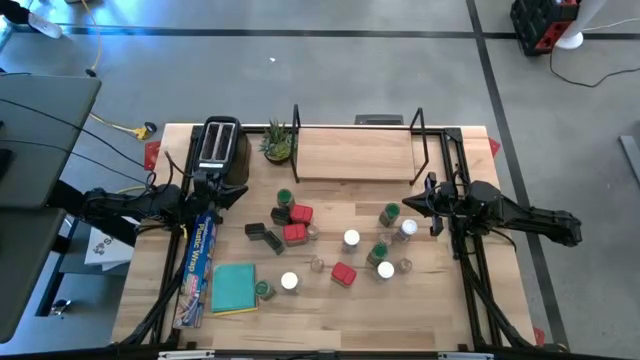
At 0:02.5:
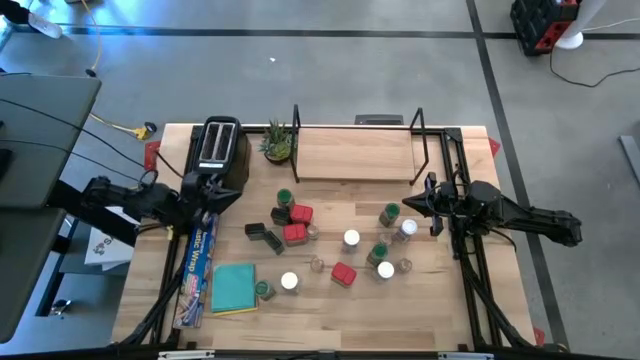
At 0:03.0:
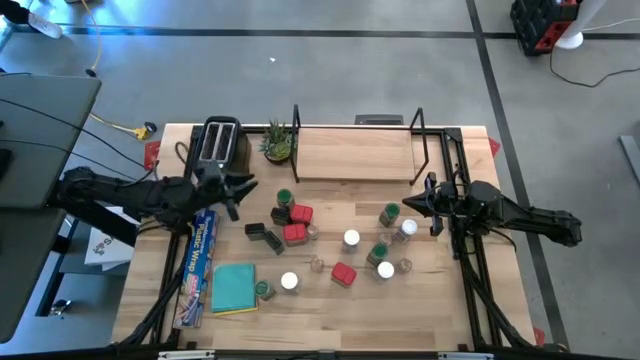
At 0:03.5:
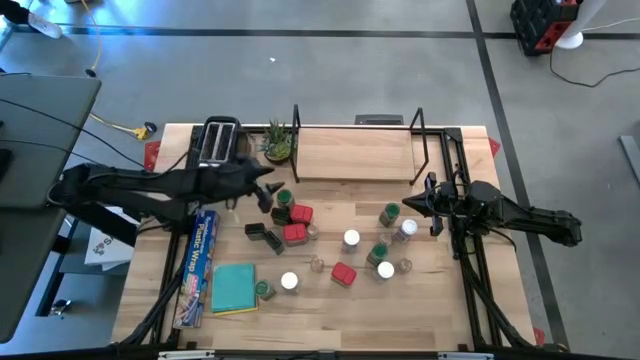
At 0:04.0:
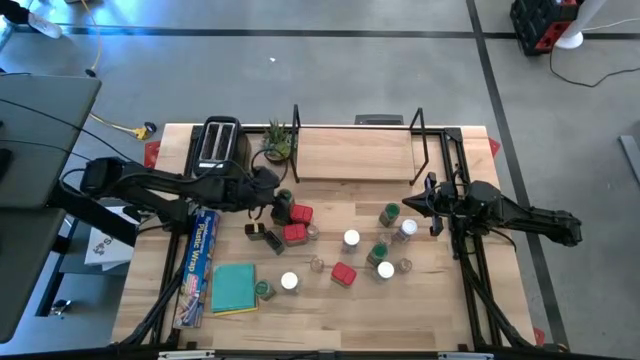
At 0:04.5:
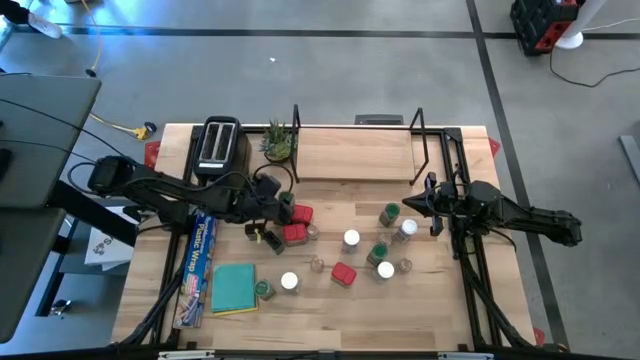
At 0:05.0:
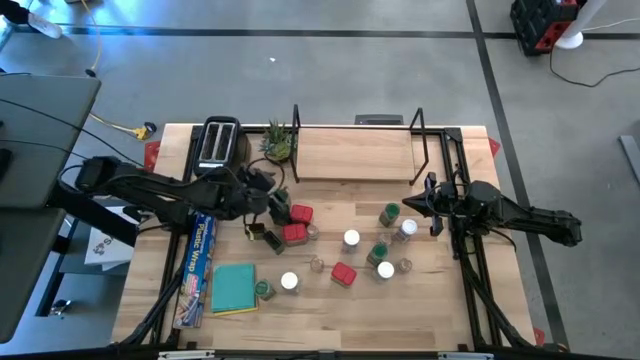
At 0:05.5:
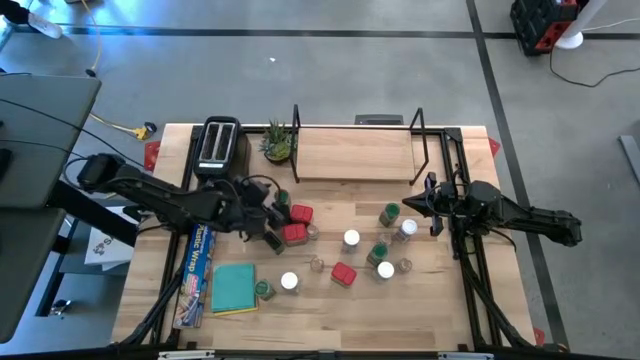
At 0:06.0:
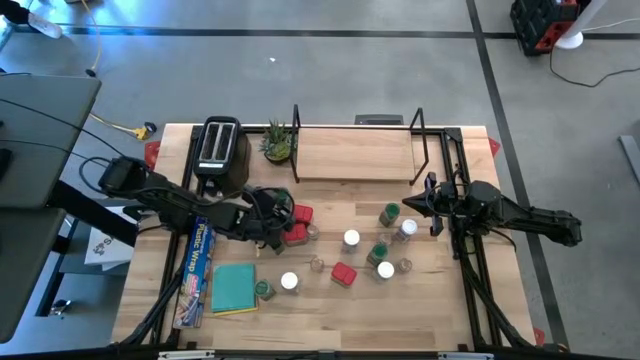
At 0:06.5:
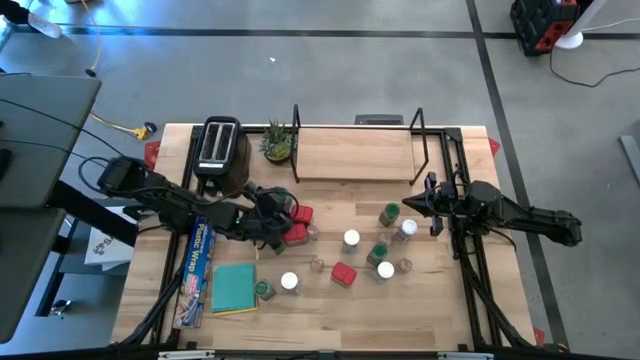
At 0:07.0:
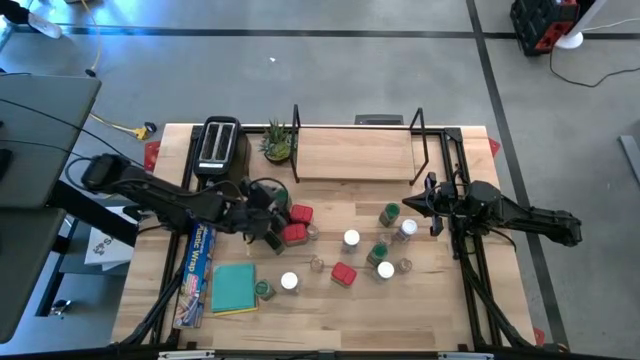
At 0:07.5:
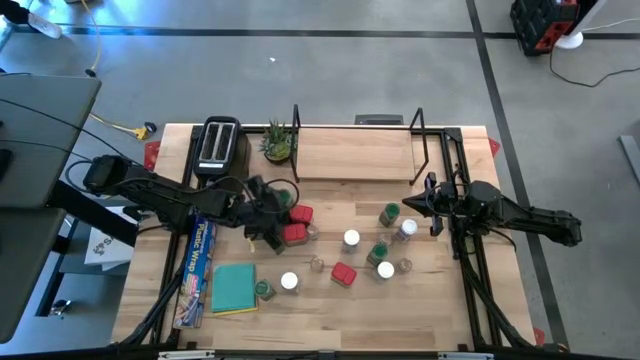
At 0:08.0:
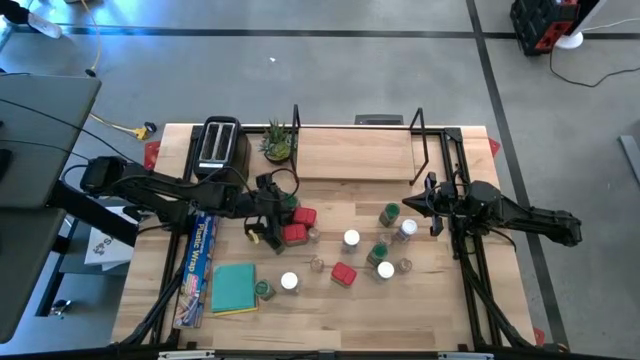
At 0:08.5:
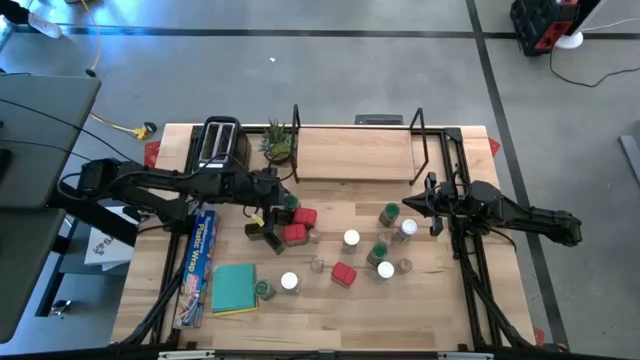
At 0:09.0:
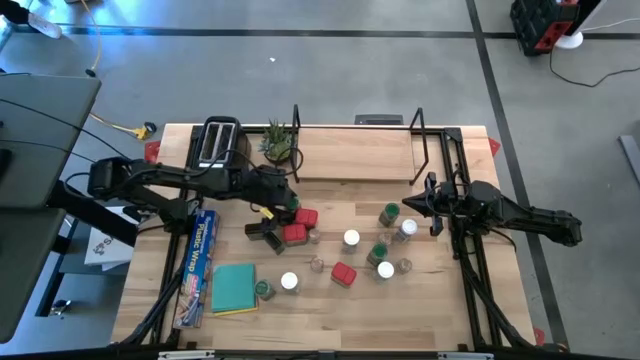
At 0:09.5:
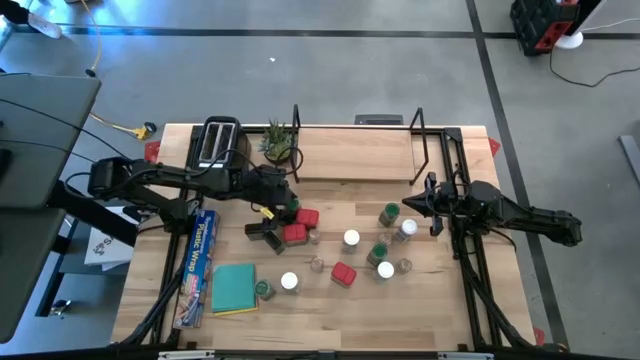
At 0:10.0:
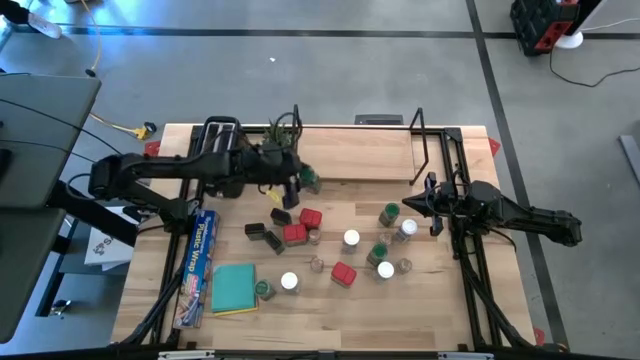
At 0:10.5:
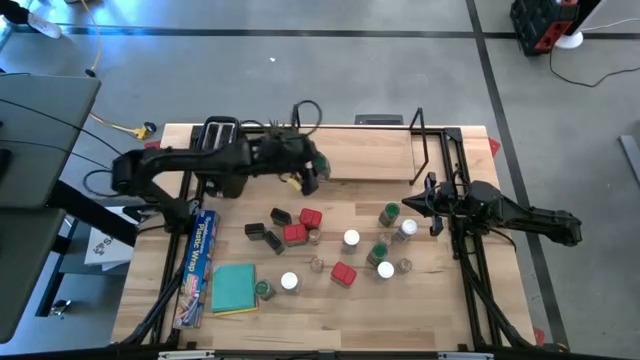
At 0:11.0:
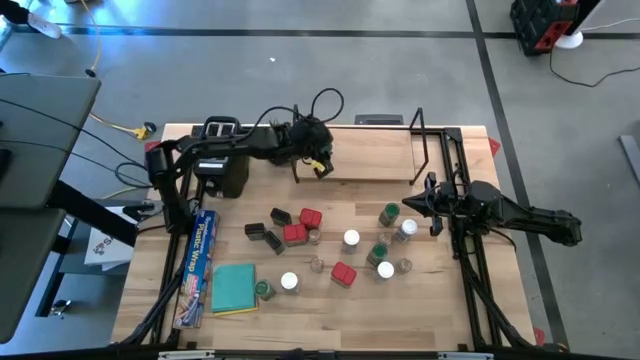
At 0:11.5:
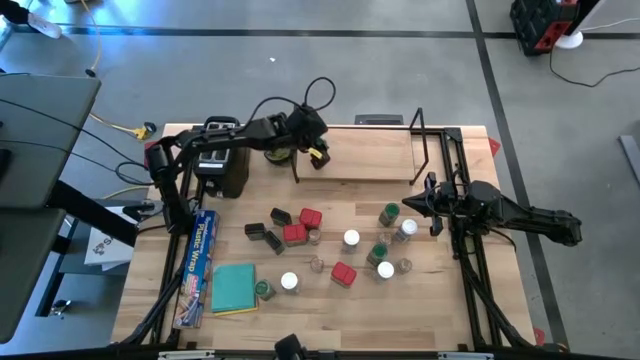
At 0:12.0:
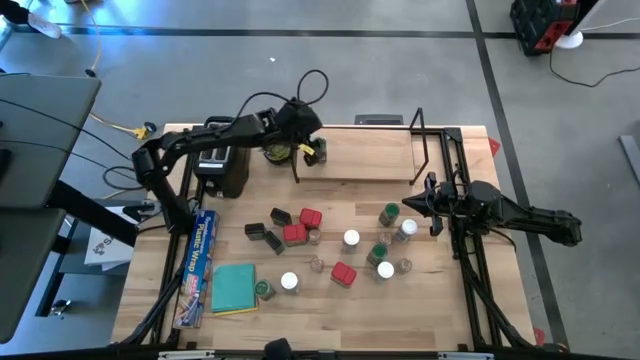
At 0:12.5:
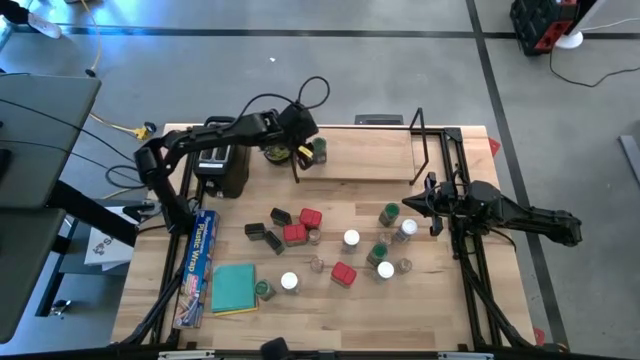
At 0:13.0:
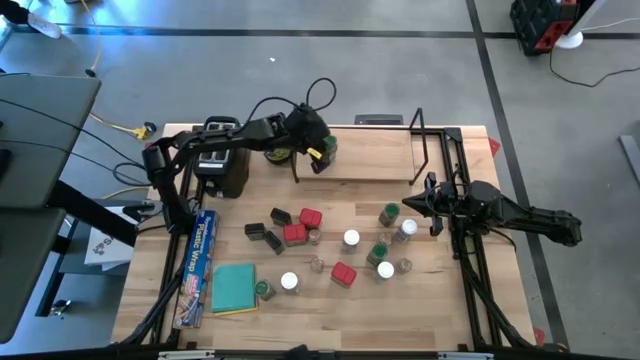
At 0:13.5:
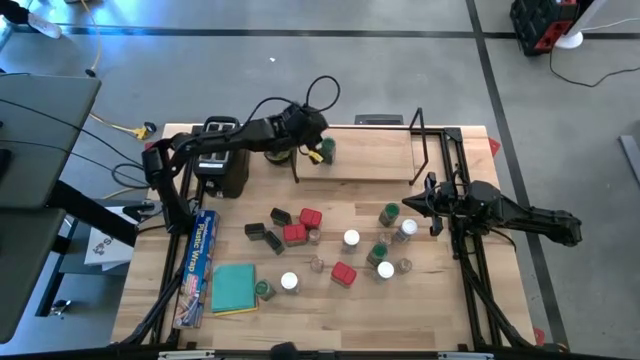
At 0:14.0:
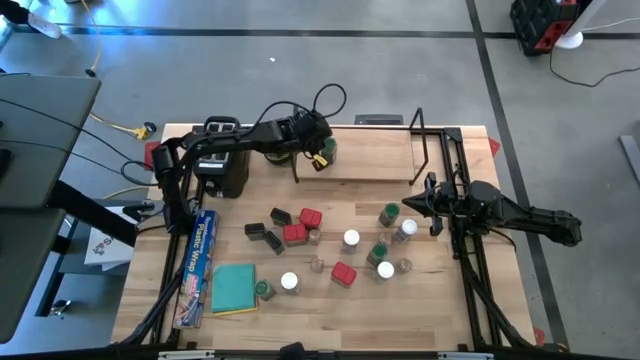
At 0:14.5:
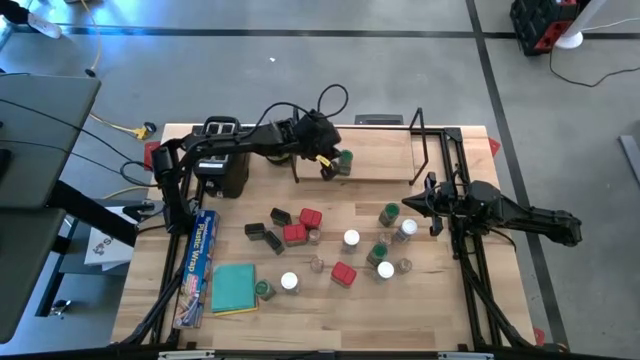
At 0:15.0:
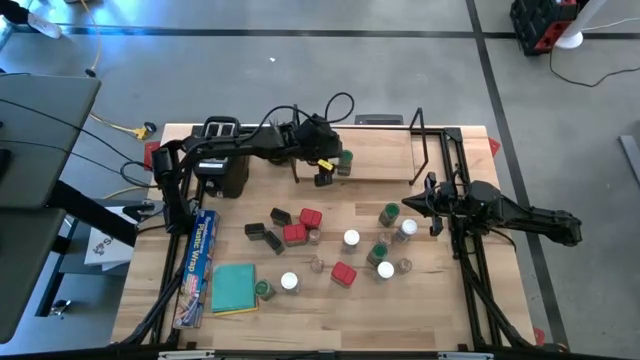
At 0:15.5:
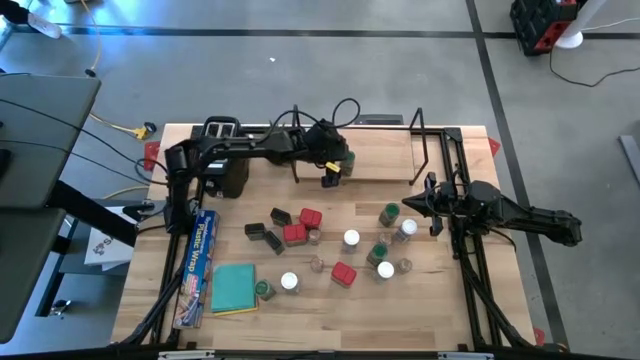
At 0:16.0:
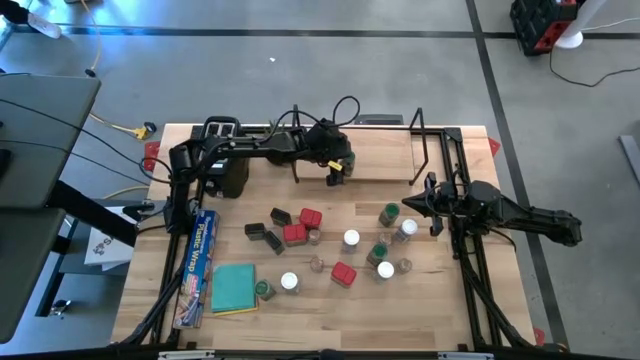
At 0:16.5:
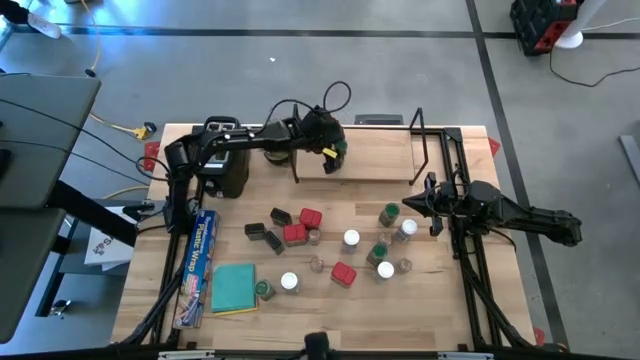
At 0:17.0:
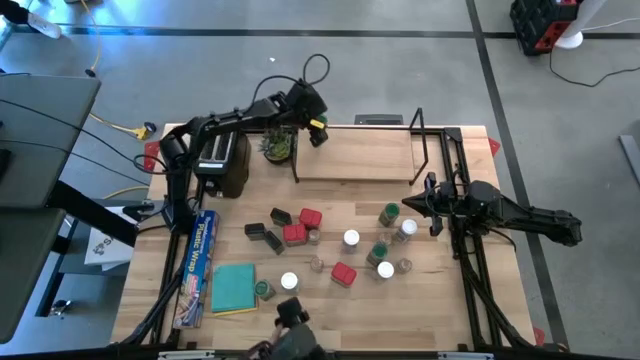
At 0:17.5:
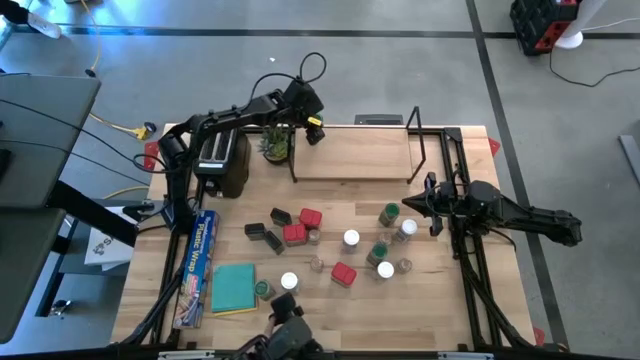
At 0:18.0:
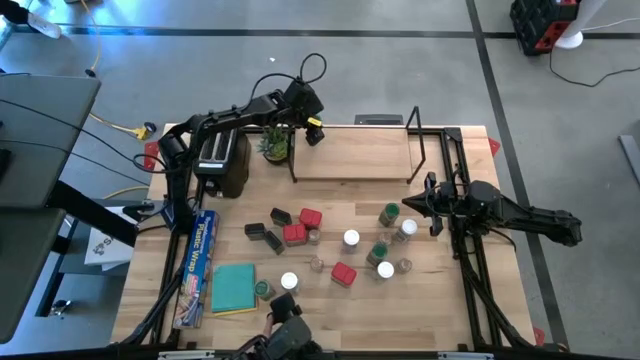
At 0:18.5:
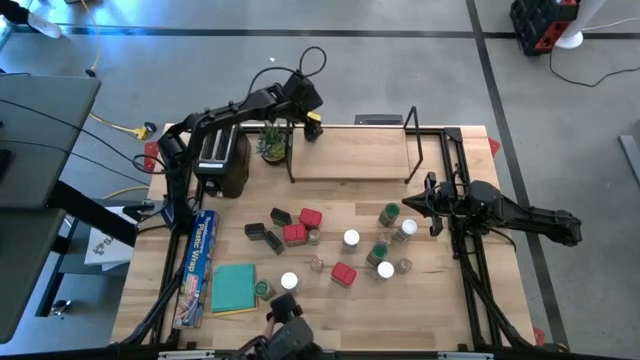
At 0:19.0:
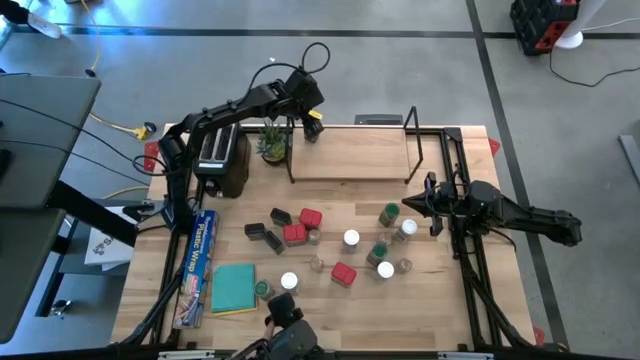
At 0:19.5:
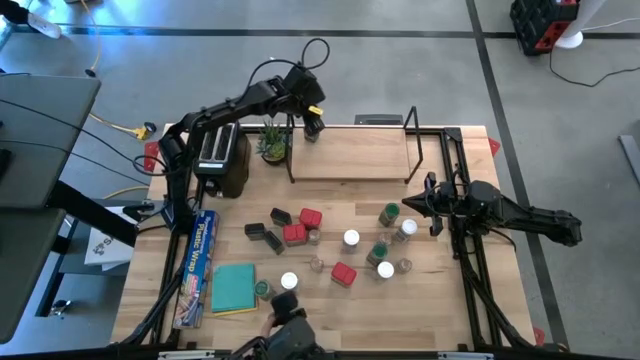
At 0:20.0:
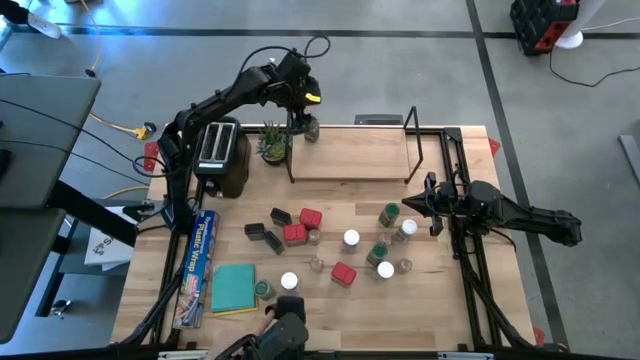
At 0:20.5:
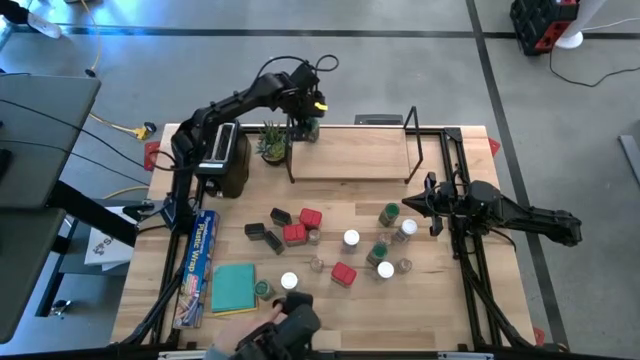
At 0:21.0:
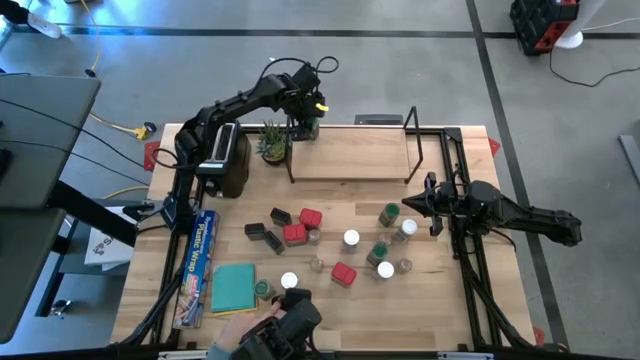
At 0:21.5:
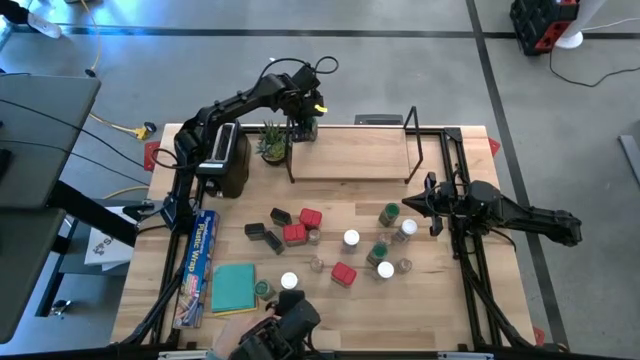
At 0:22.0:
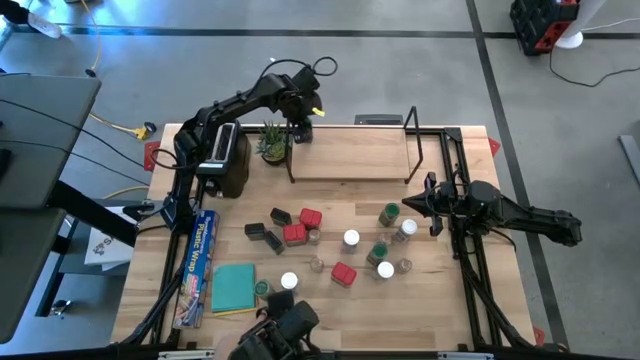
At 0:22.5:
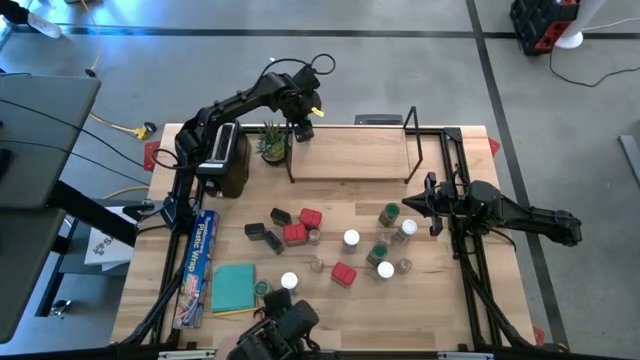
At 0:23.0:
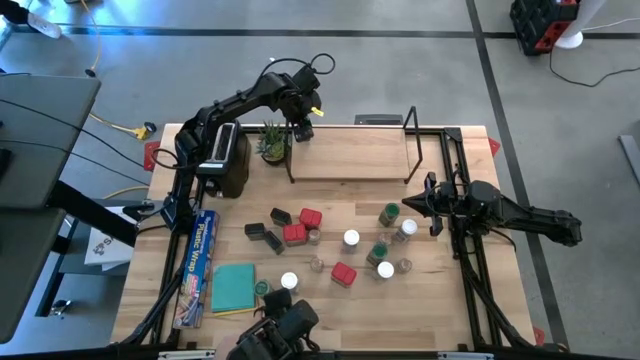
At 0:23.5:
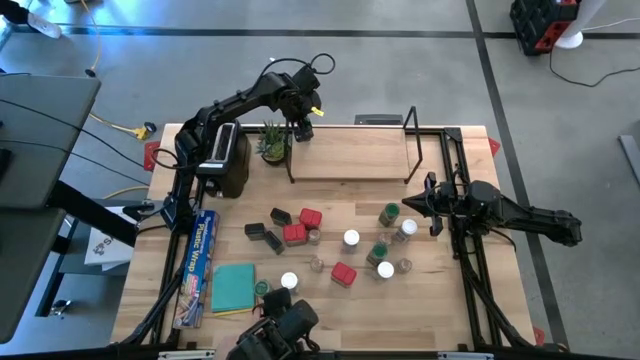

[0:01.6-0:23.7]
Task: Shelf spices
Put the top left green seasoning bottle on the shelf
